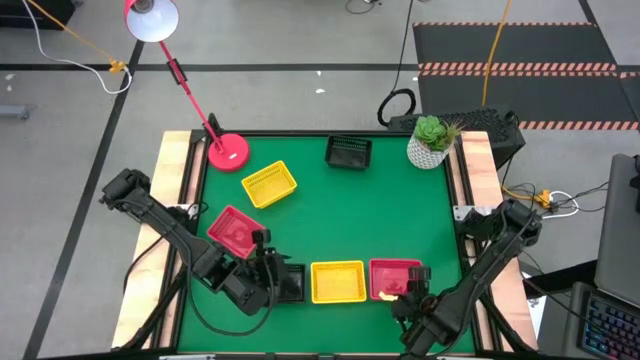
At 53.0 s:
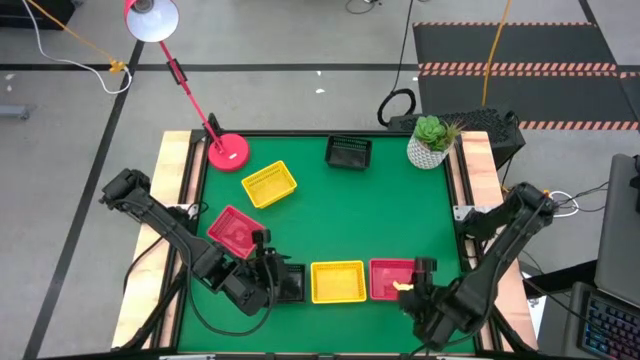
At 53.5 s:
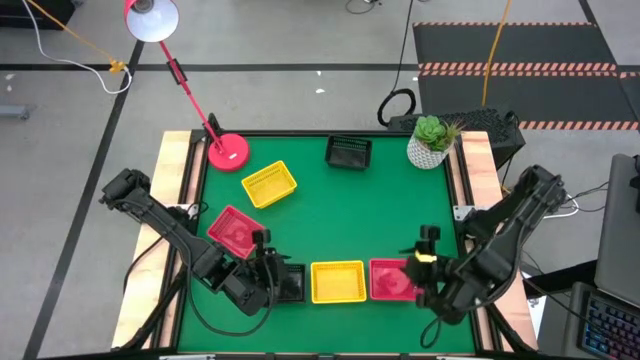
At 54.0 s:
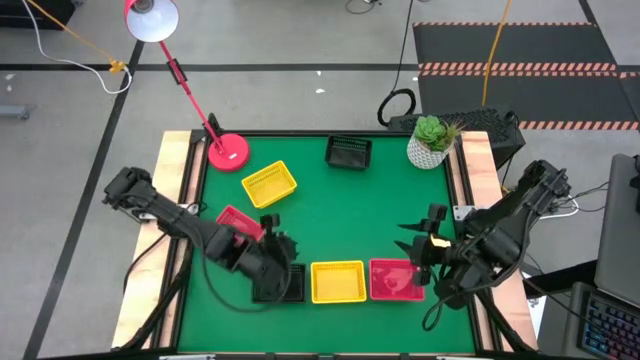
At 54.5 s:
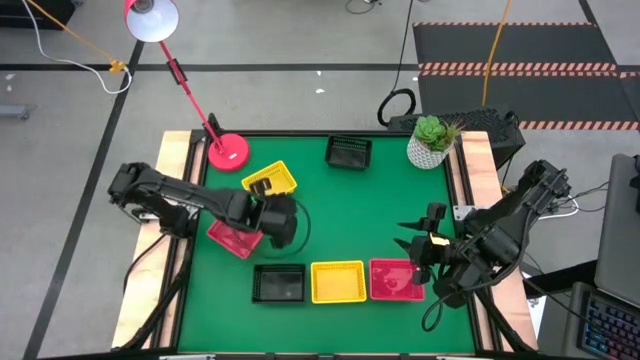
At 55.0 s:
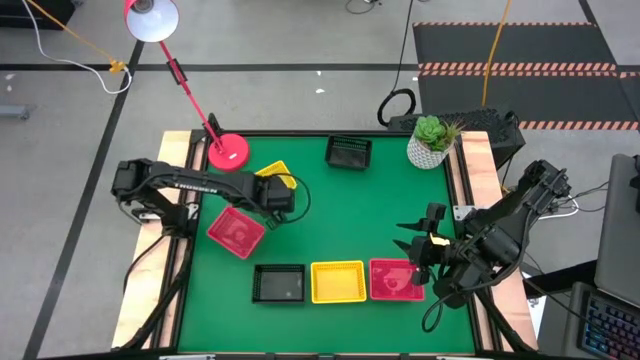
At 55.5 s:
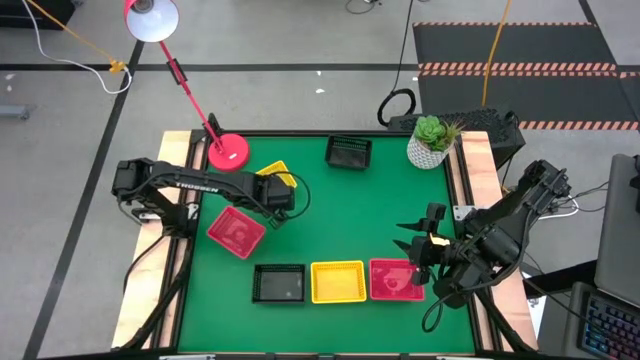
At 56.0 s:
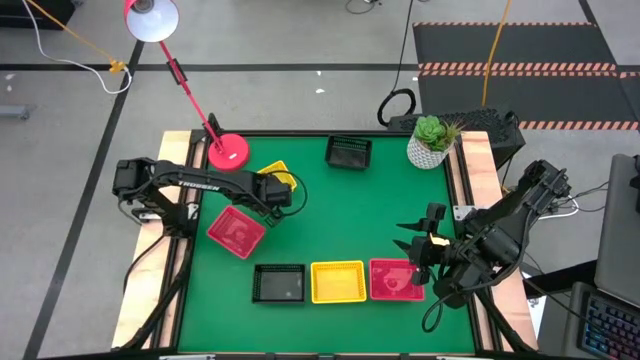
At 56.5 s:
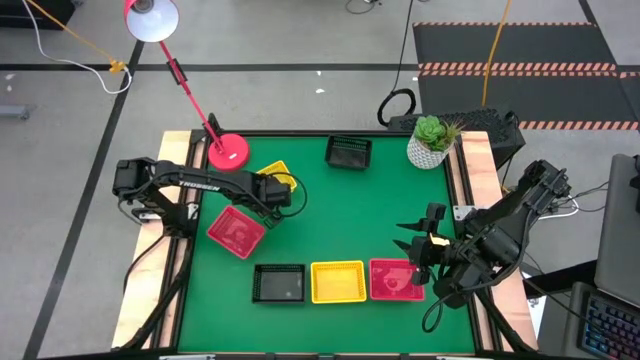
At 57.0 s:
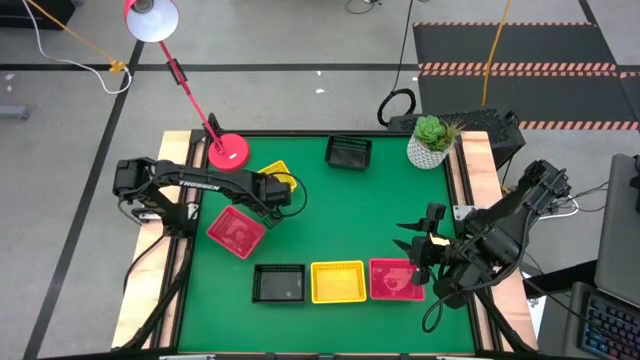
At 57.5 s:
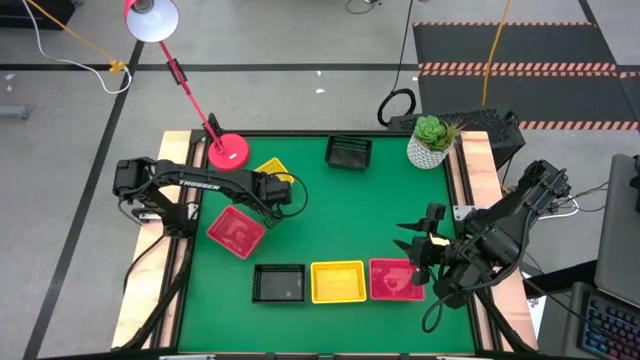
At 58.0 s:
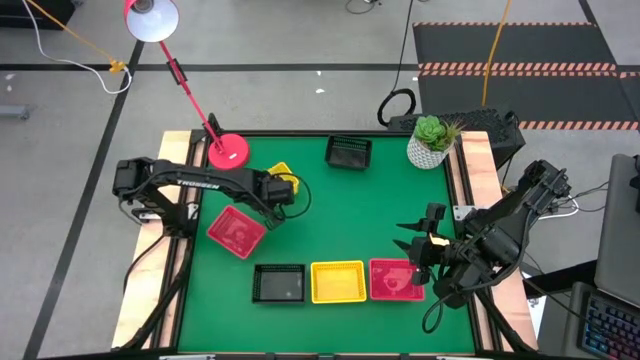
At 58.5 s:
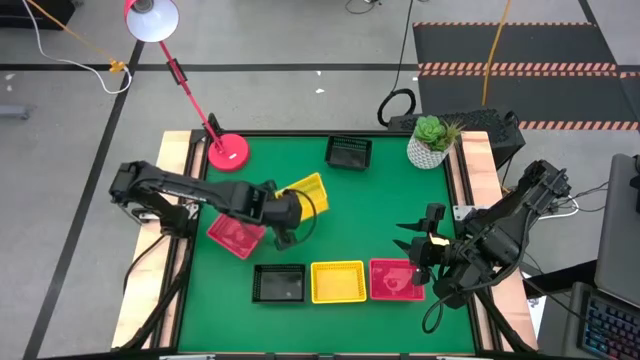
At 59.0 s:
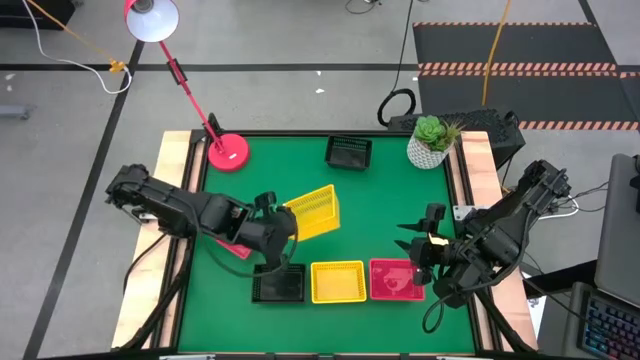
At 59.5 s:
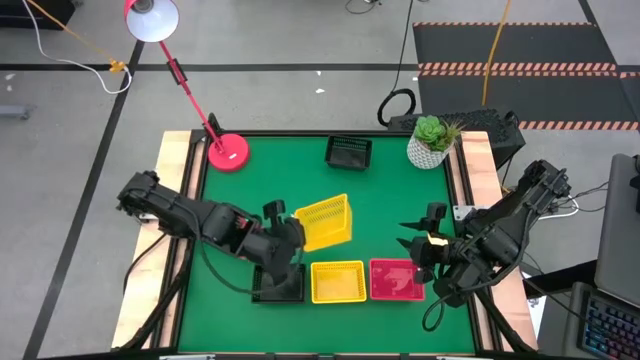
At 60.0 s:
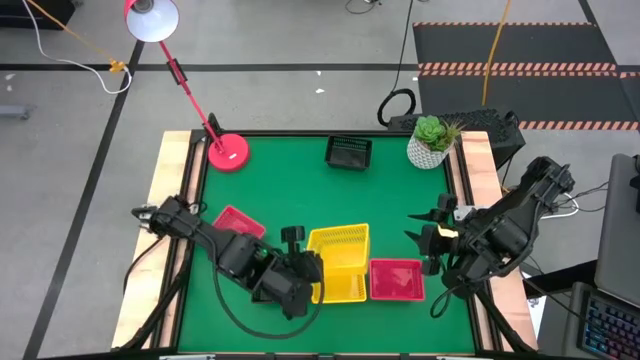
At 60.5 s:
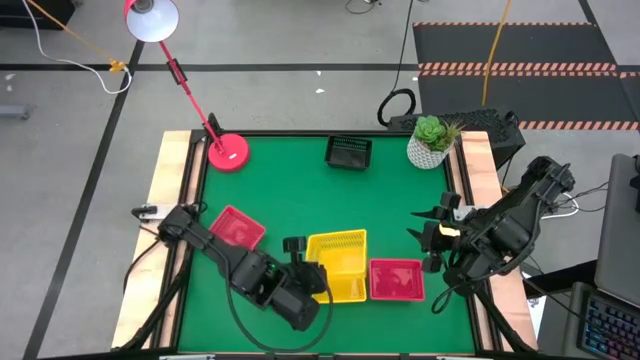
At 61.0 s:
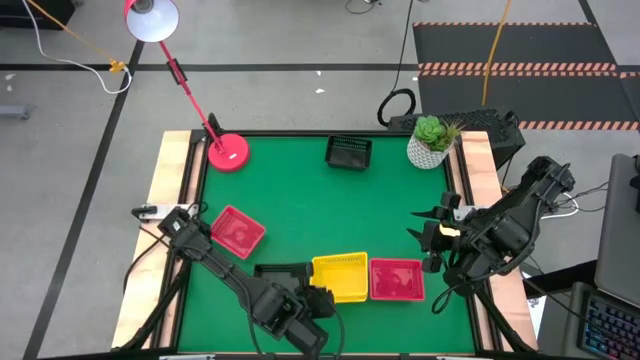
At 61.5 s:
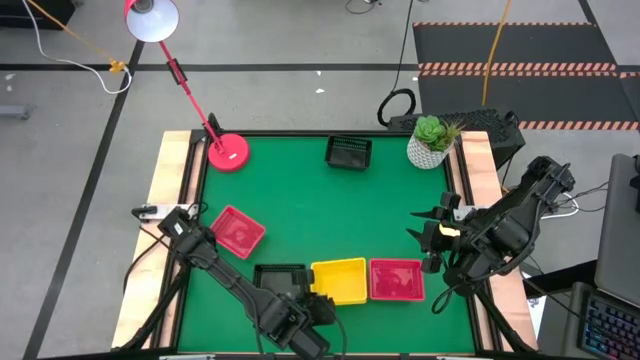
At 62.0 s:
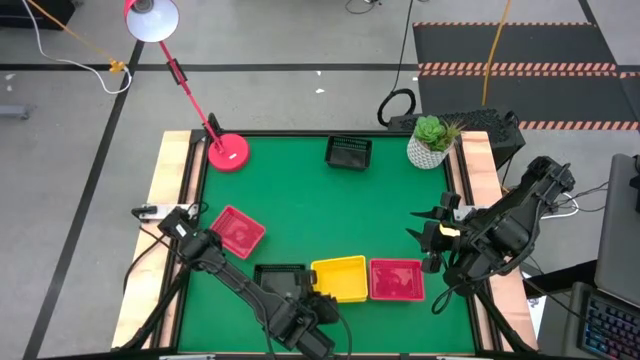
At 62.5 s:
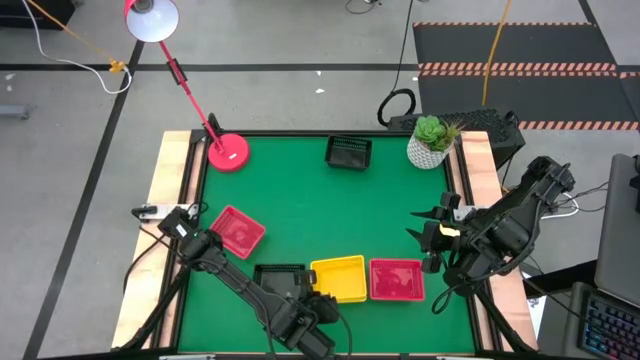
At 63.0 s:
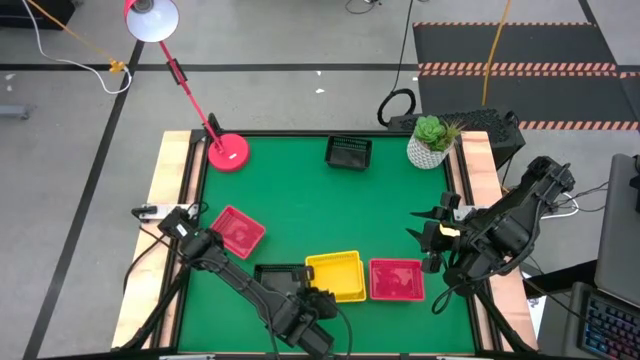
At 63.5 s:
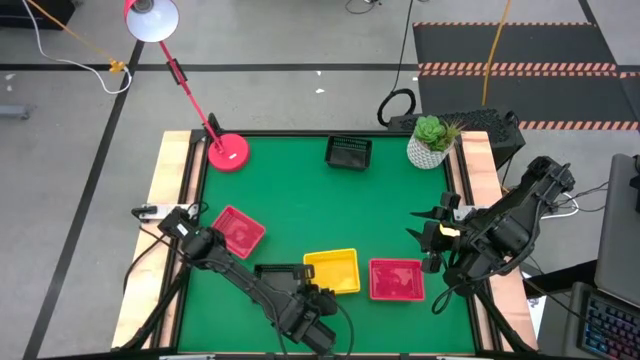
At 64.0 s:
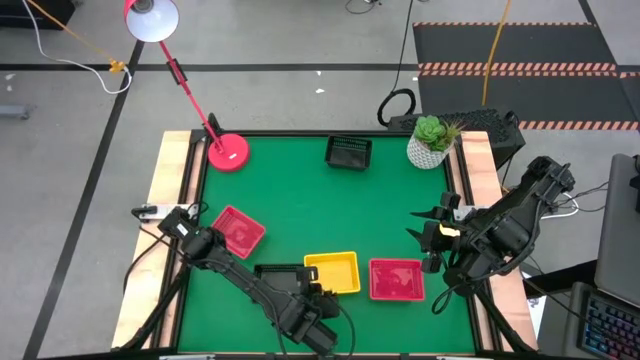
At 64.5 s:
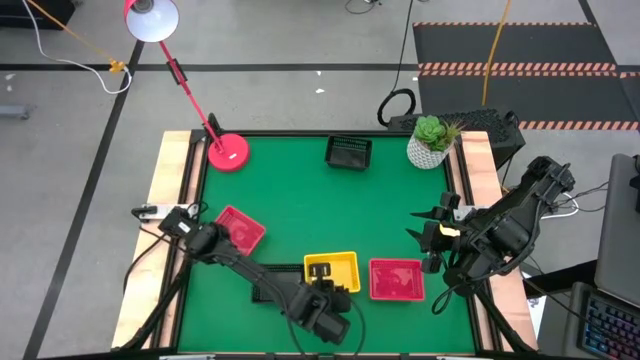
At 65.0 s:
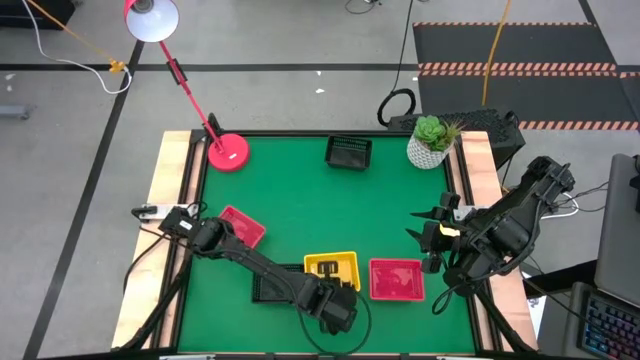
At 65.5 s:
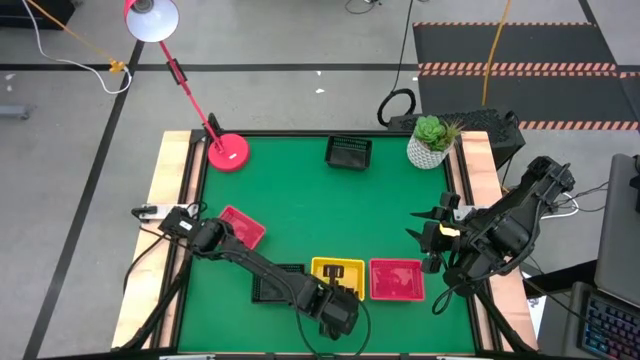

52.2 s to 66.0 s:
Stack the top yellow bin on top of the bottom yellow bin

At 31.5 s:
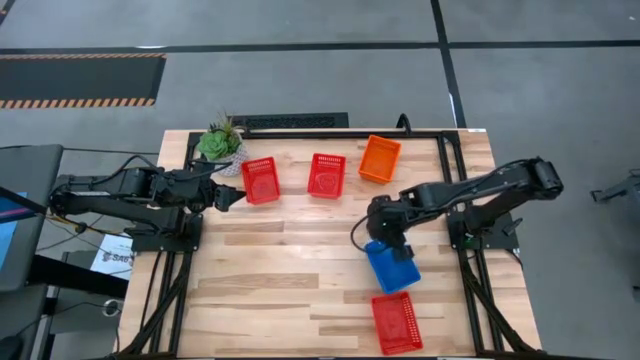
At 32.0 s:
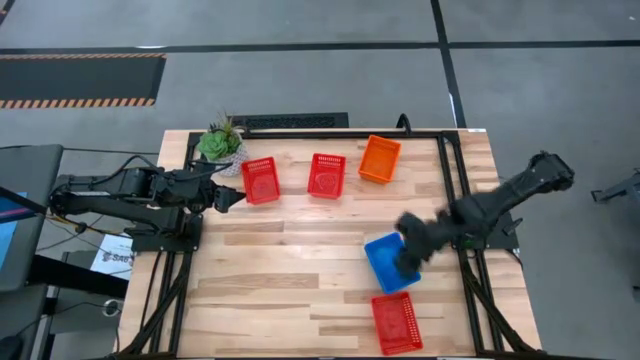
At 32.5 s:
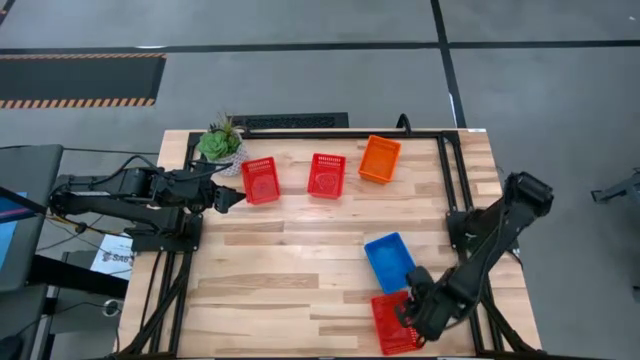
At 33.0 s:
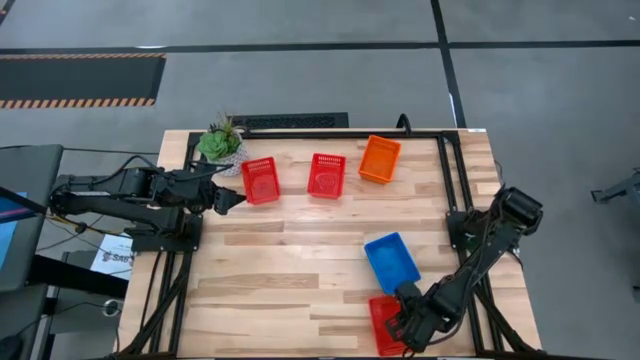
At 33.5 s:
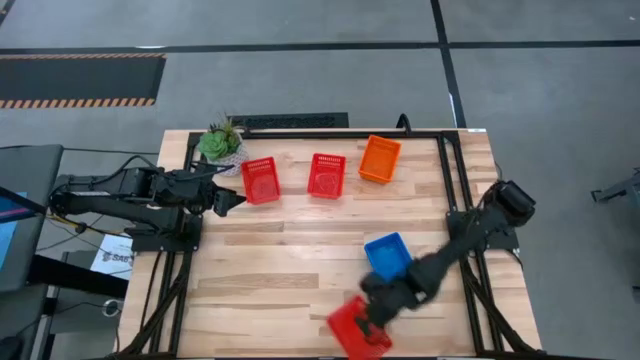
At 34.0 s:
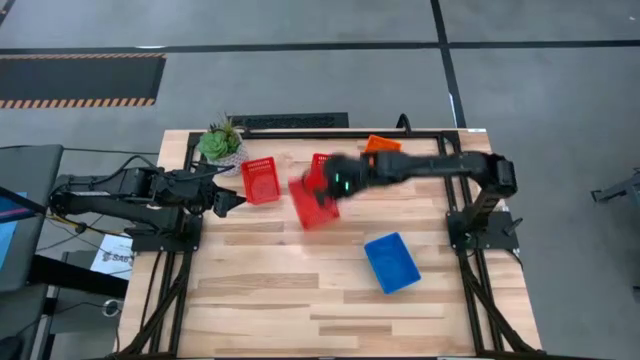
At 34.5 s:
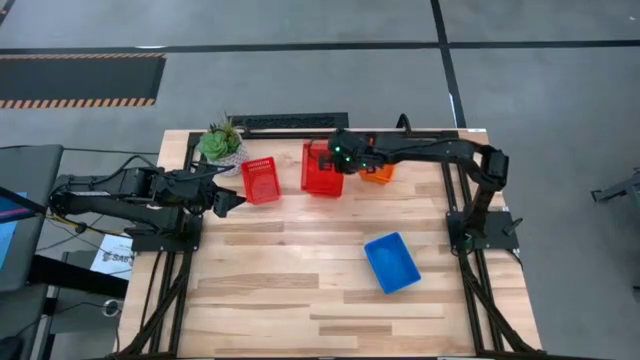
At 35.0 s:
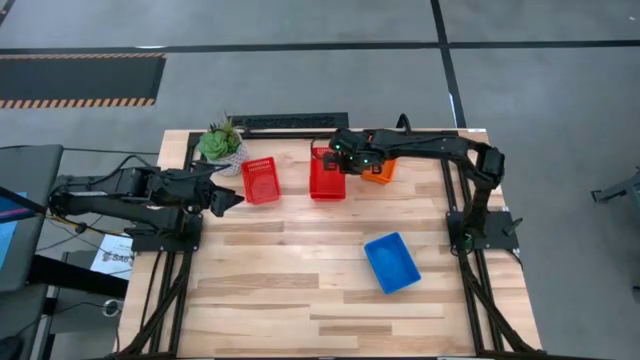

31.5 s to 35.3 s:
Stack the bottom red bin on top of the top right red bin

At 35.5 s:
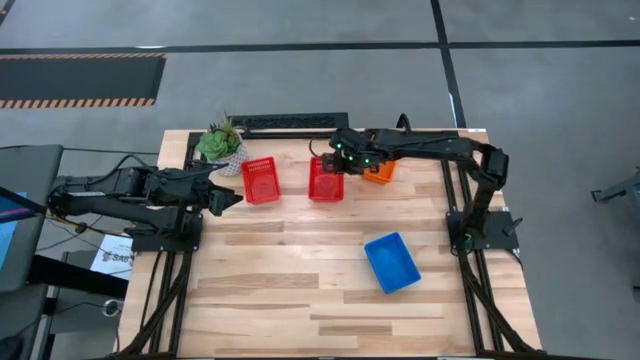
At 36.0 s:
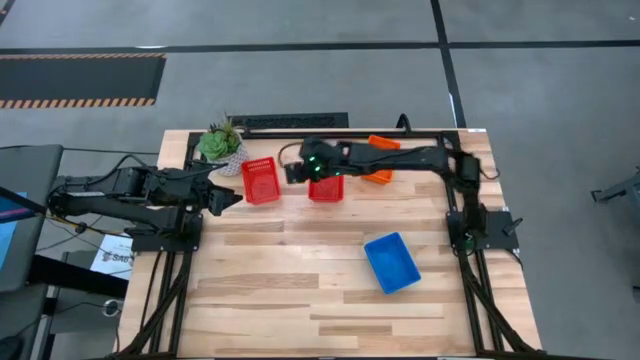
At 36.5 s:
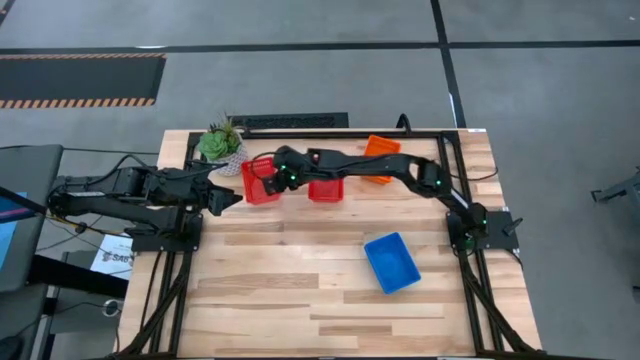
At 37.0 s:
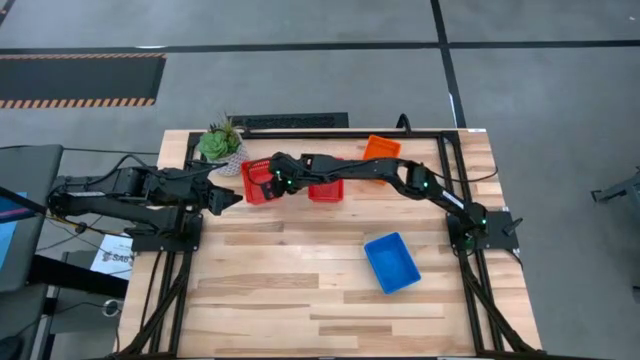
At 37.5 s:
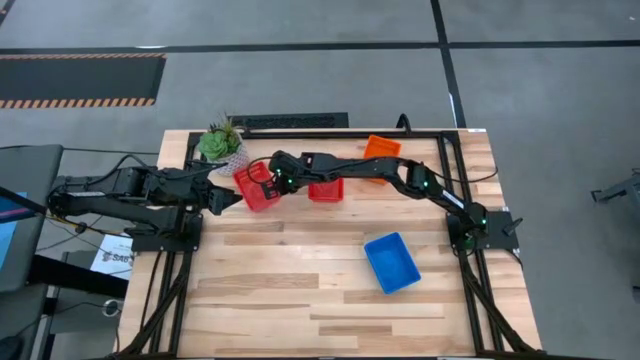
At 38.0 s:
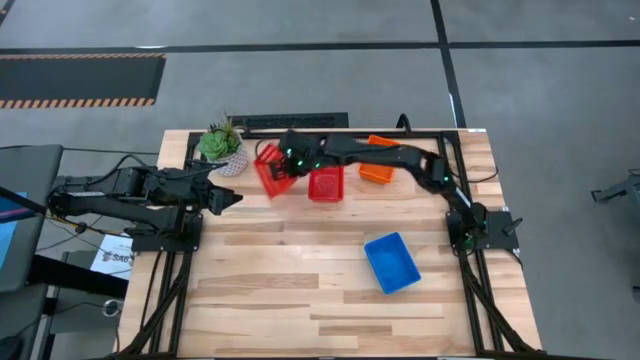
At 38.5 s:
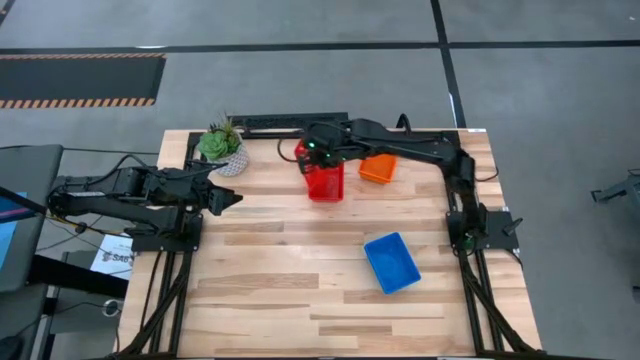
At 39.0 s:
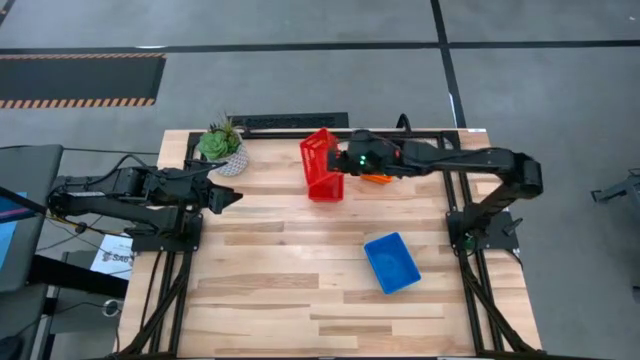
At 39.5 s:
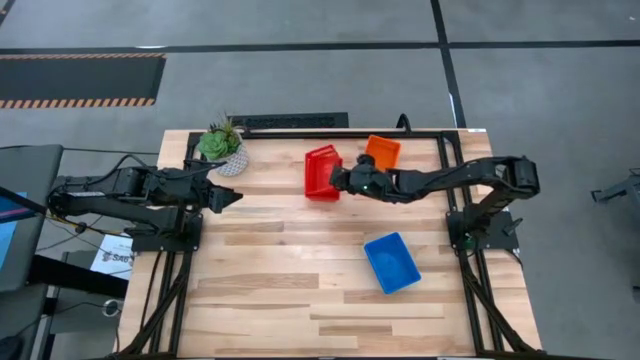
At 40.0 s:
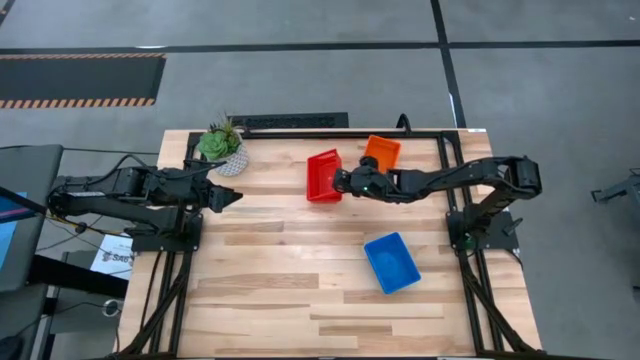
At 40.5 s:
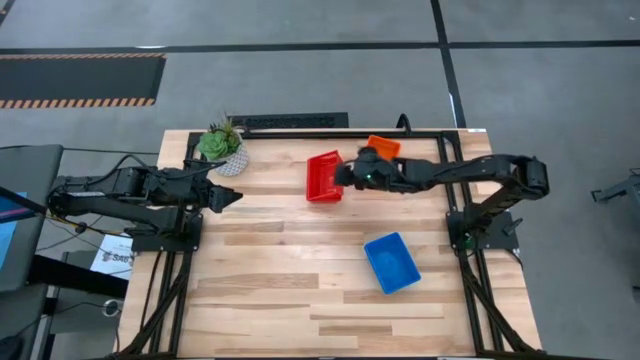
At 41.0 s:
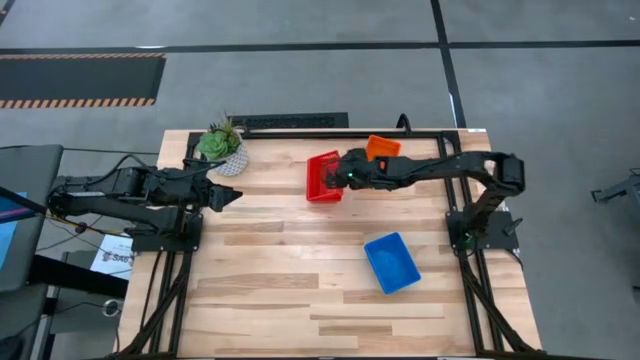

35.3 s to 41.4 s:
Stack the left red bin on top of the right red bin
